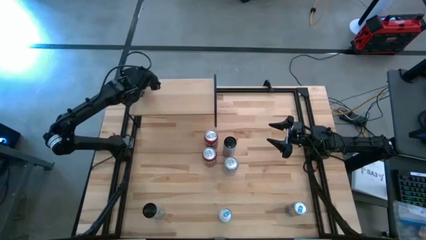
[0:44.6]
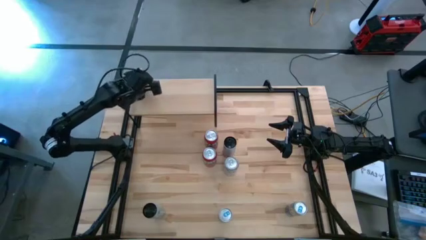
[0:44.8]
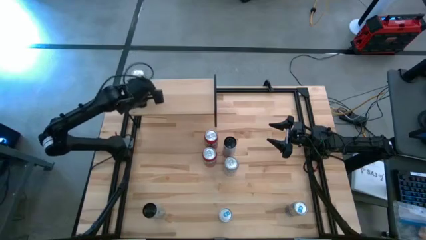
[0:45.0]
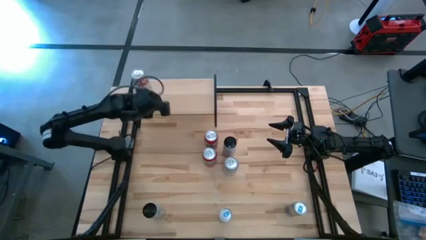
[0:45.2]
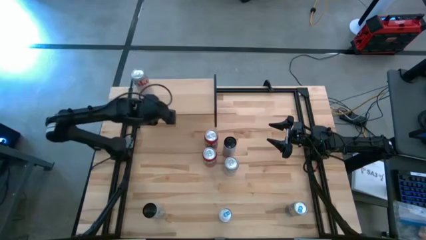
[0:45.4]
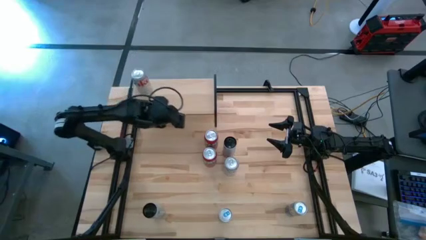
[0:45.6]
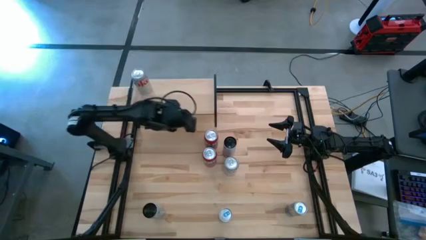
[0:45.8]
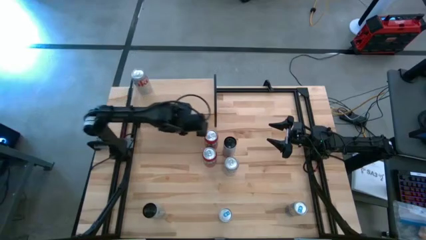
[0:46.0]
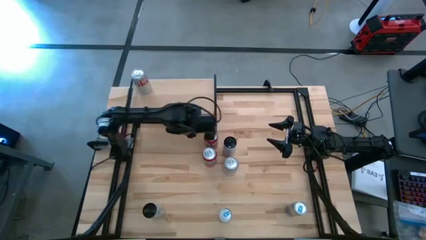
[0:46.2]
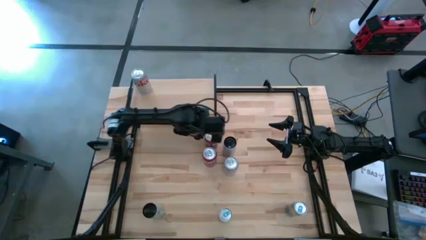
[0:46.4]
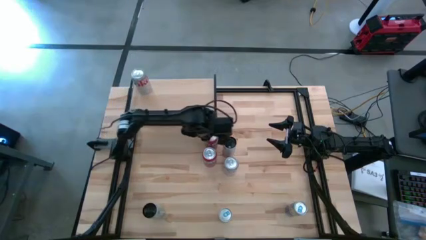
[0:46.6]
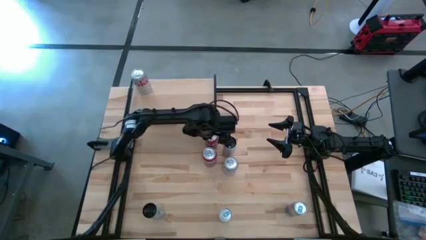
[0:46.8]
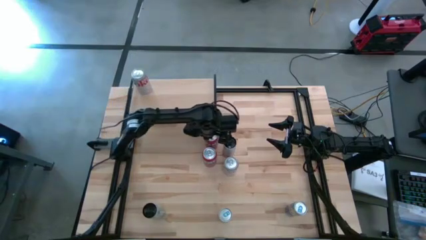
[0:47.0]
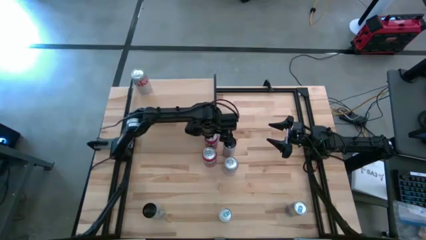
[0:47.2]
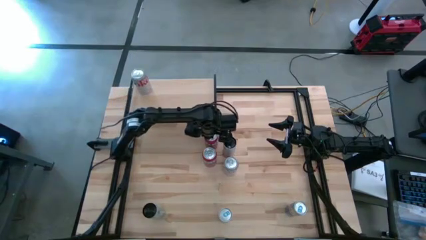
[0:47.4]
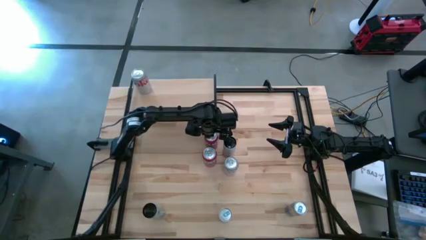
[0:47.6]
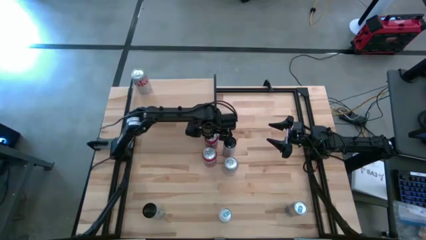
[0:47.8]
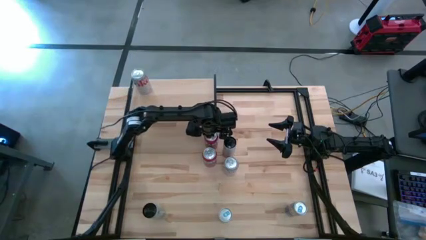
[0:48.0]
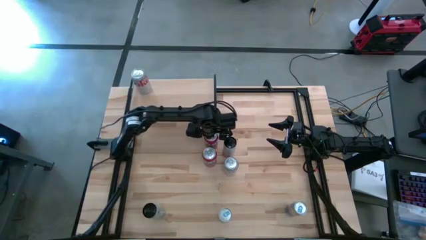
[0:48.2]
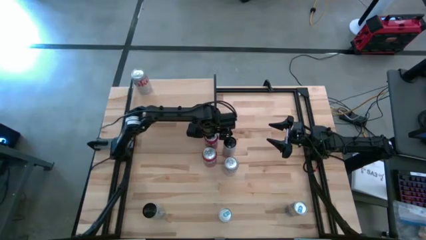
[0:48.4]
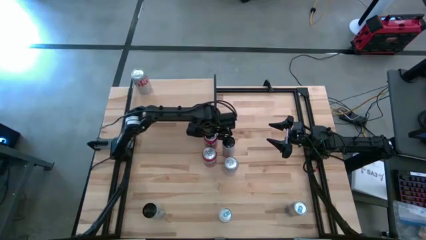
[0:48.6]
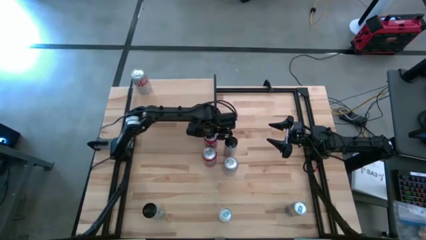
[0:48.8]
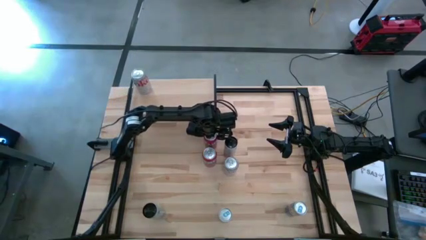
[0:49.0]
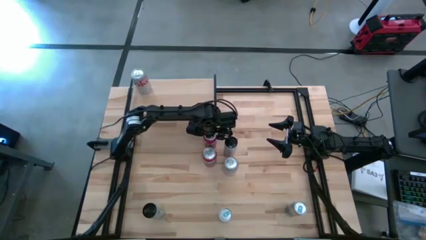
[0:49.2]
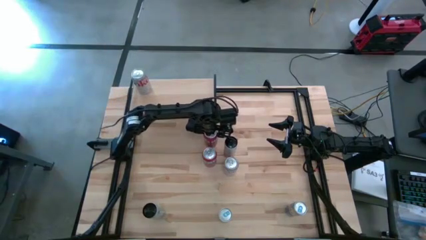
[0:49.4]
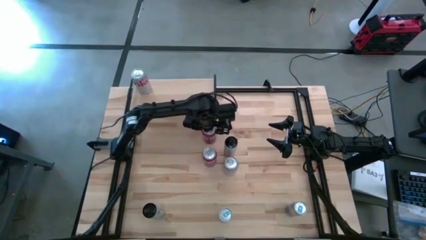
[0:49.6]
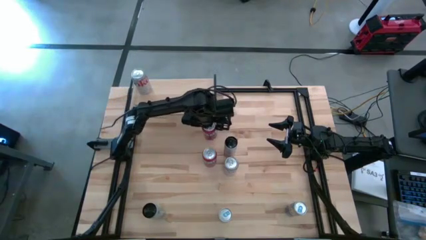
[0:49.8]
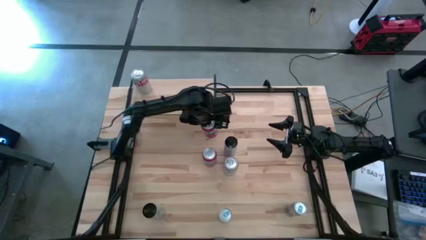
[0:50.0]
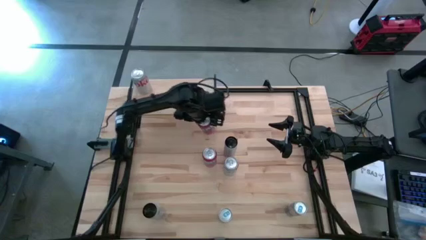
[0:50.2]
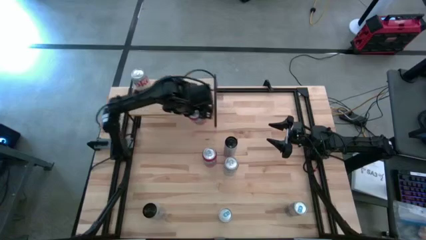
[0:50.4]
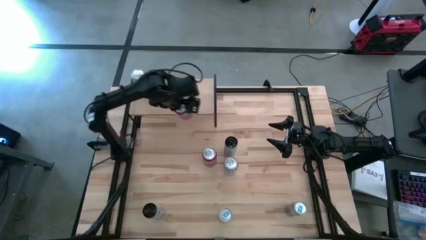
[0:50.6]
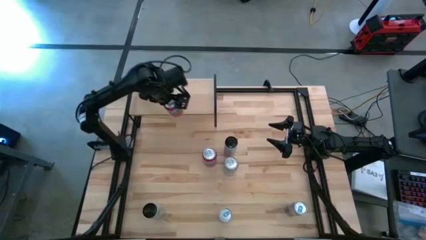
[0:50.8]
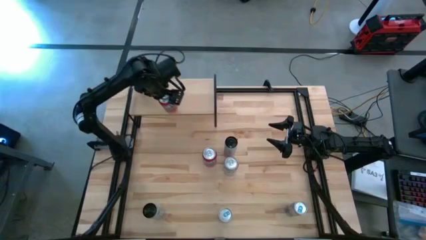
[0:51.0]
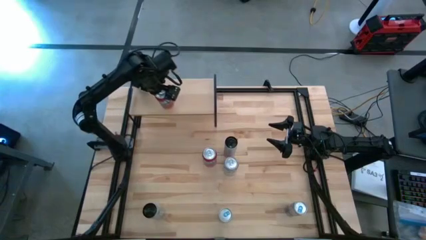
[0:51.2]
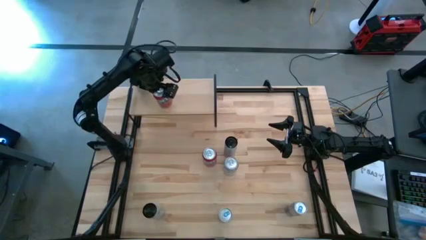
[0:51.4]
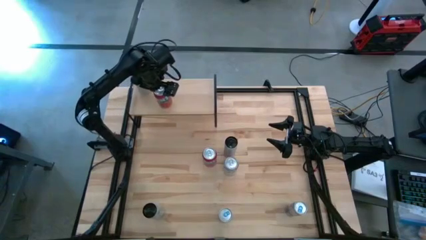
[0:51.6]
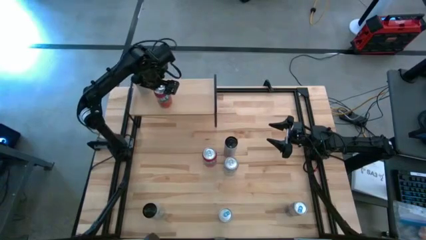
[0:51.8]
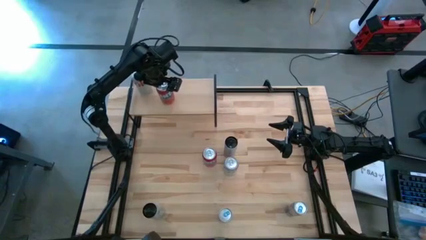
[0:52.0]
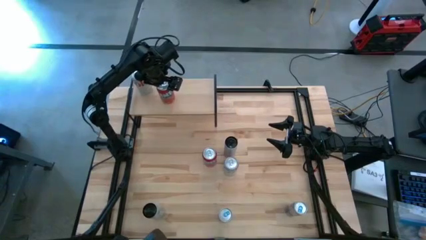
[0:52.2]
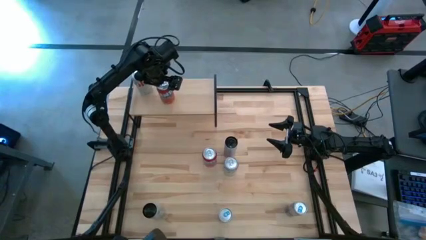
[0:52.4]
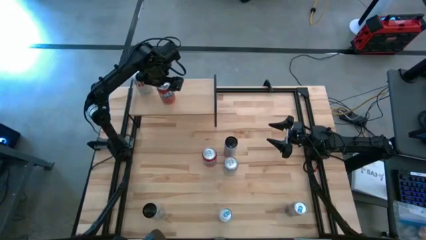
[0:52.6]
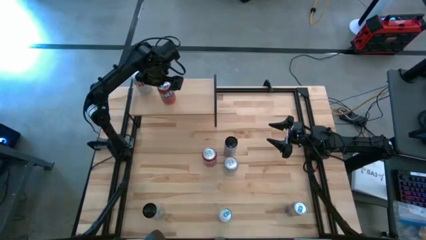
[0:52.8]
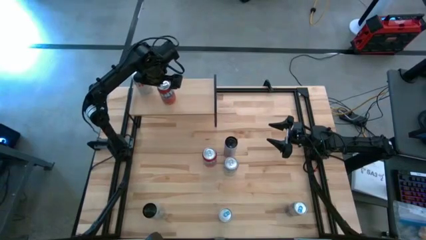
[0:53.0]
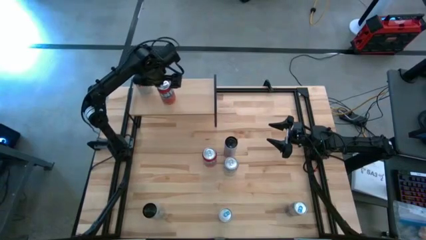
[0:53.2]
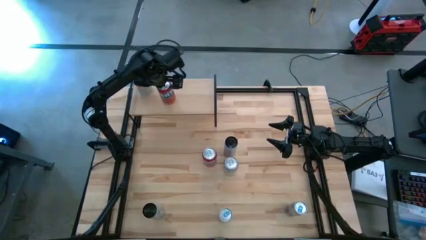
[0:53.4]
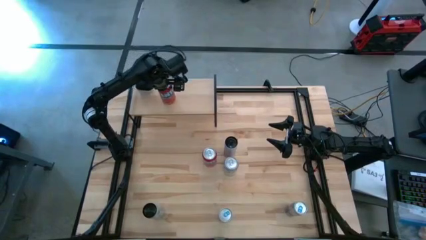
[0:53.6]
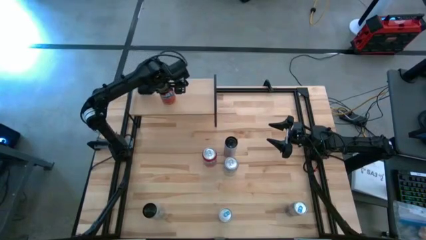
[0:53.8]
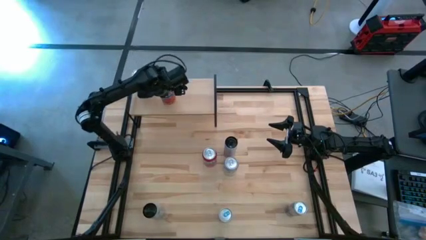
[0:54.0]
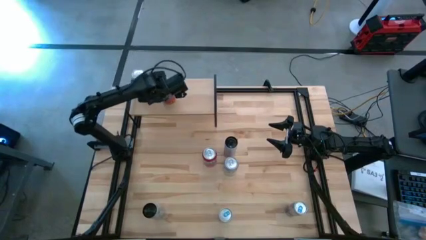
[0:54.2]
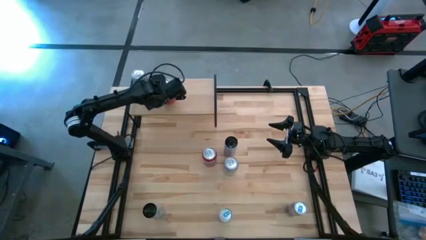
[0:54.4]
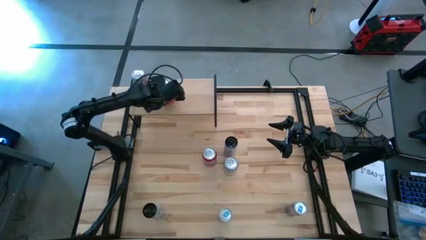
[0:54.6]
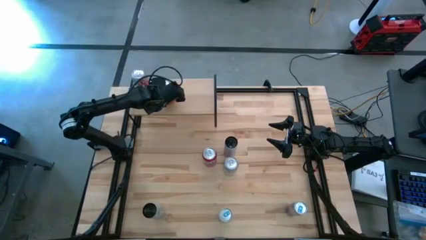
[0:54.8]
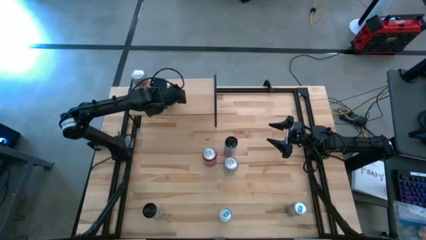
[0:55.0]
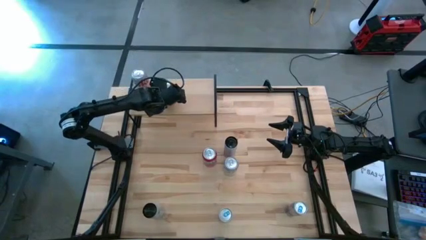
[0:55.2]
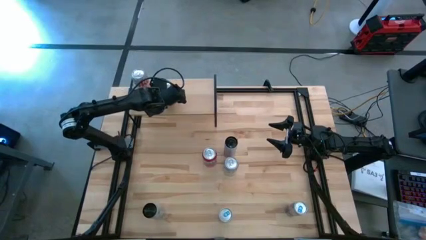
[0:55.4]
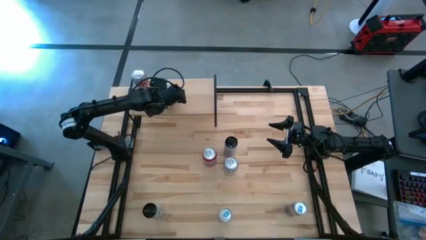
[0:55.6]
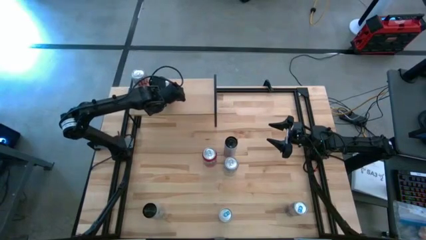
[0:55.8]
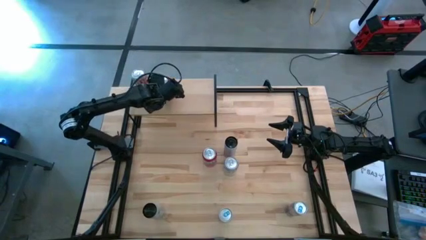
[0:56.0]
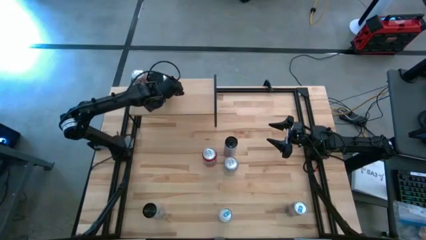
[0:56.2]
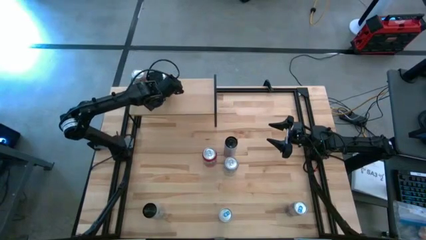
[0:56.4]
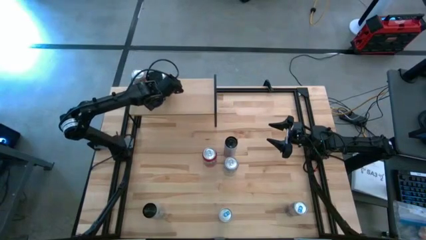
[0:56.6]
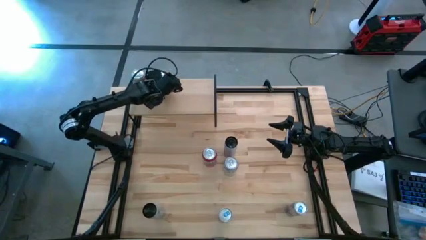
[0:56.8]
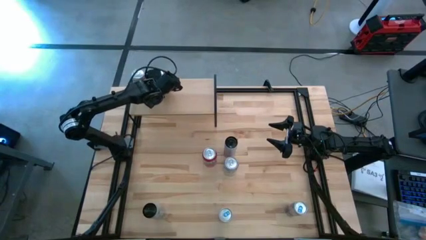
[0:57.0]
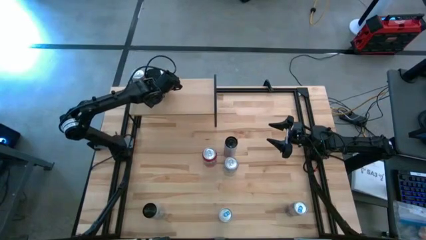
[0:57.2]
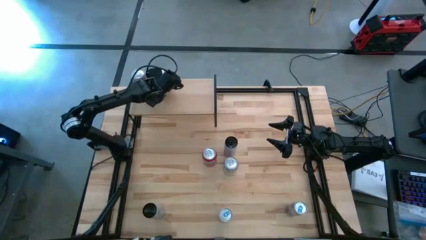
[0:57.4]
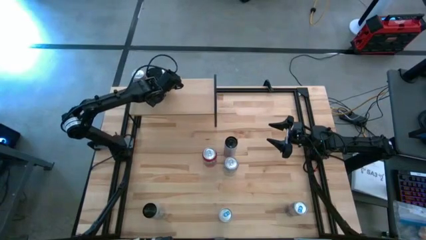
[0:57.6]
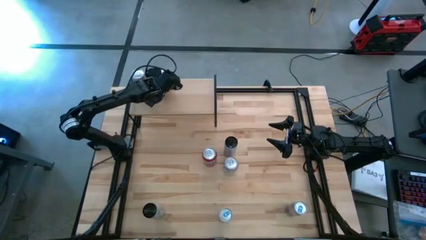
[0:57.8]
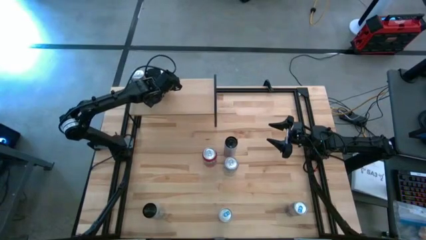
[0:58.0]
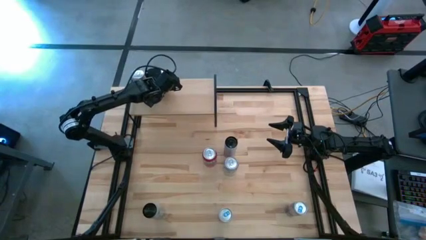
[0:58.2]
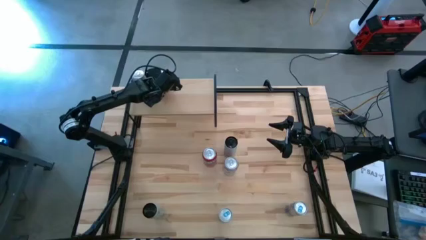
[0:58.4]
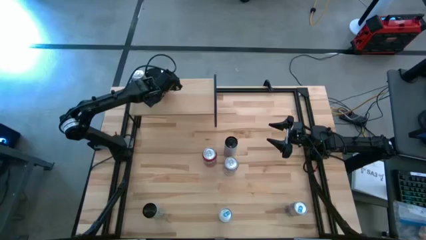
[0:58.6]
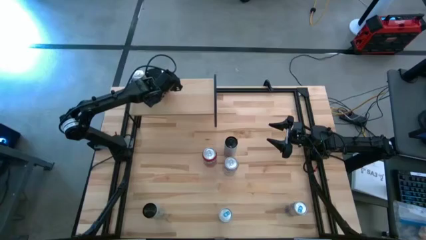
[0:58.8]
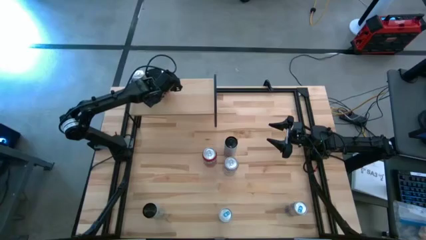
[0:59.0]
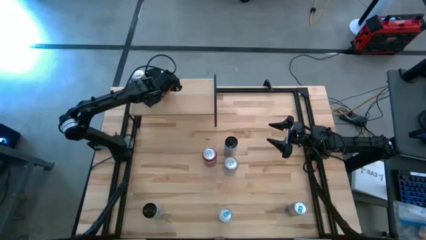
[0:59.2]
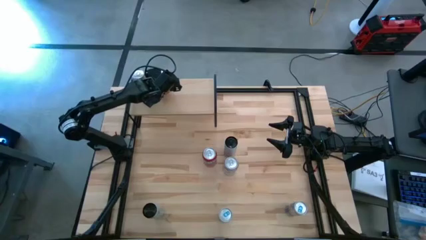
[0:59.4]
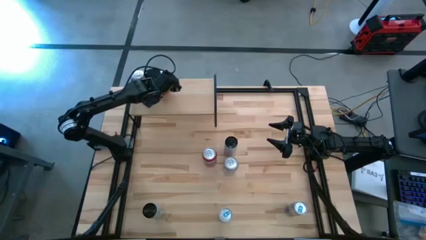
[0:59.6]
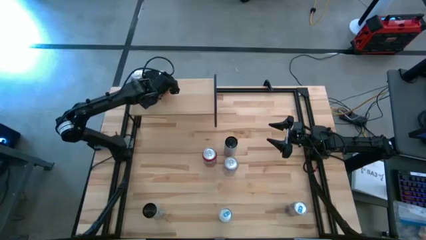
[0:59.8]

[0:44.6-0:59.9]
Task: Place canned beverage on shelf
Put the top red soda can on the shelf
